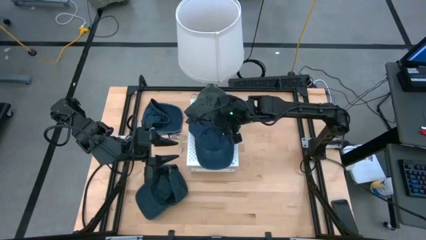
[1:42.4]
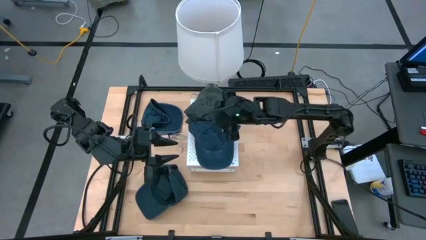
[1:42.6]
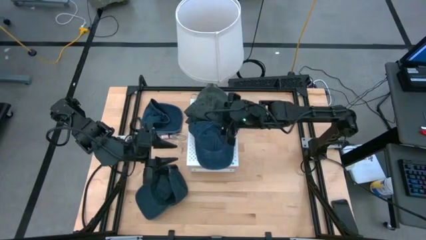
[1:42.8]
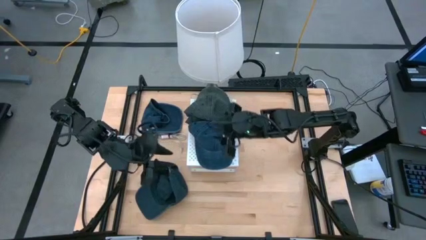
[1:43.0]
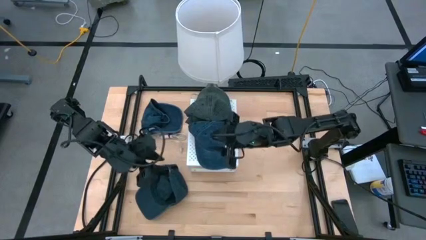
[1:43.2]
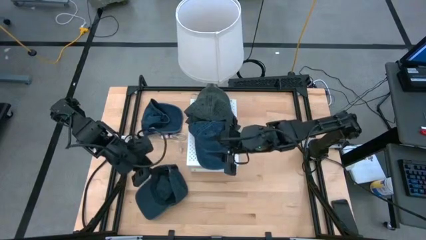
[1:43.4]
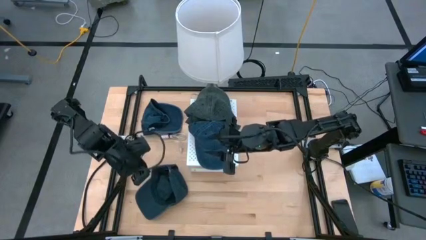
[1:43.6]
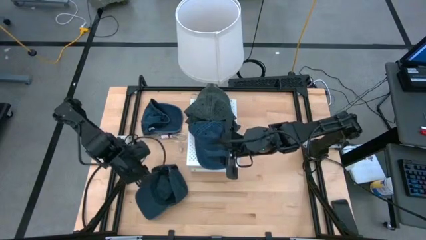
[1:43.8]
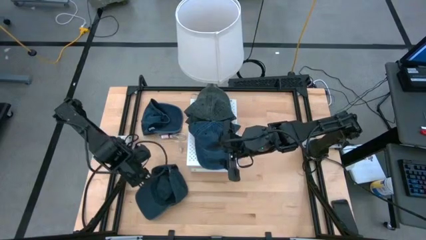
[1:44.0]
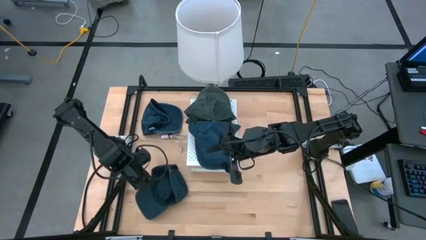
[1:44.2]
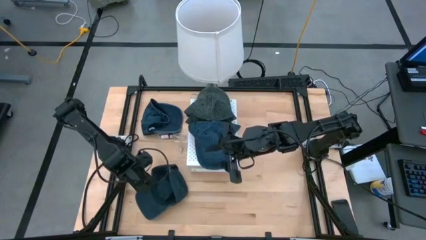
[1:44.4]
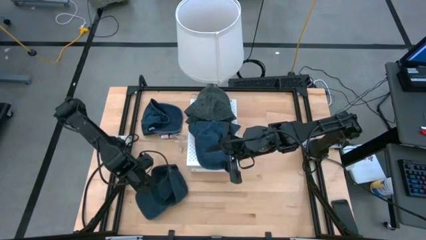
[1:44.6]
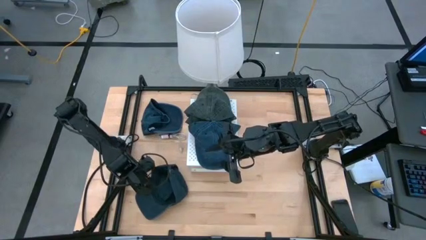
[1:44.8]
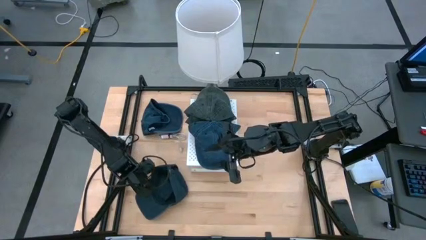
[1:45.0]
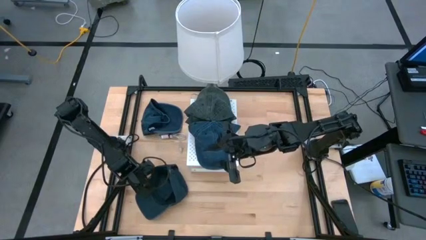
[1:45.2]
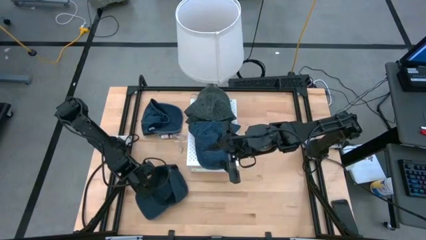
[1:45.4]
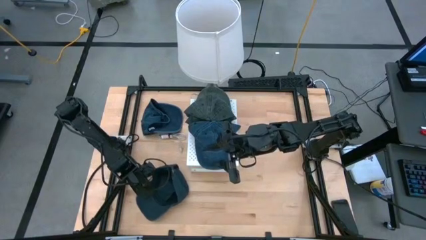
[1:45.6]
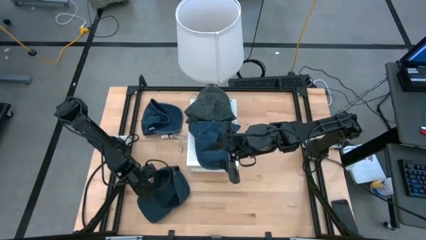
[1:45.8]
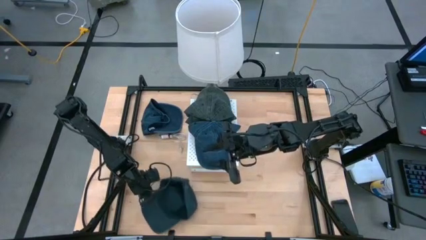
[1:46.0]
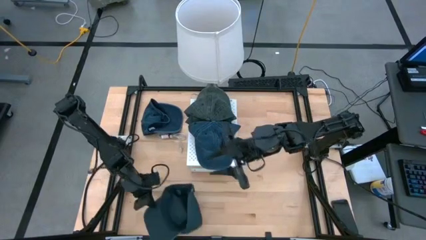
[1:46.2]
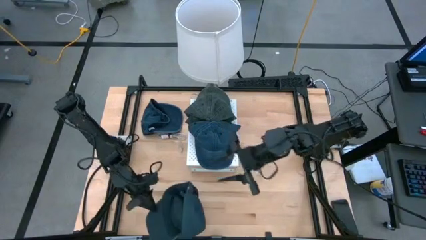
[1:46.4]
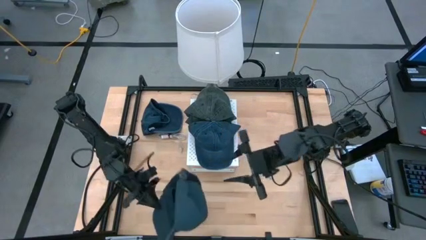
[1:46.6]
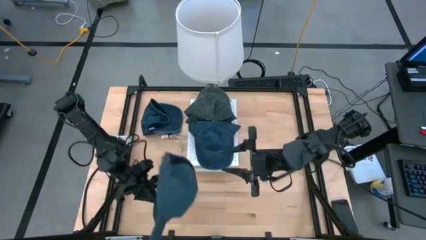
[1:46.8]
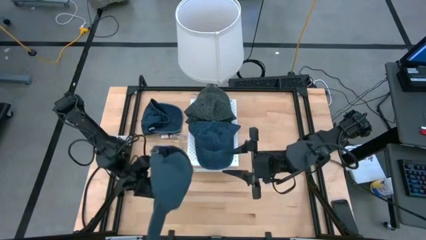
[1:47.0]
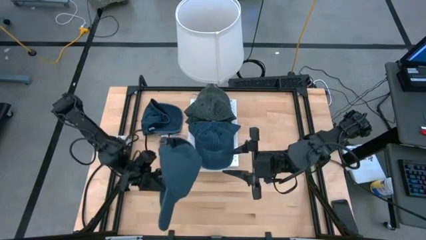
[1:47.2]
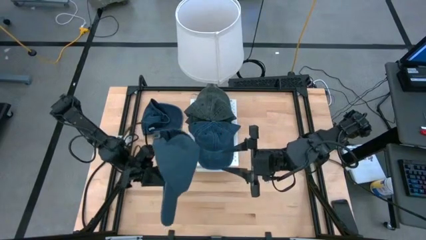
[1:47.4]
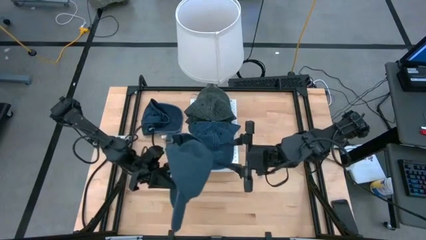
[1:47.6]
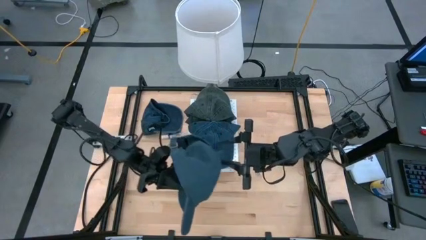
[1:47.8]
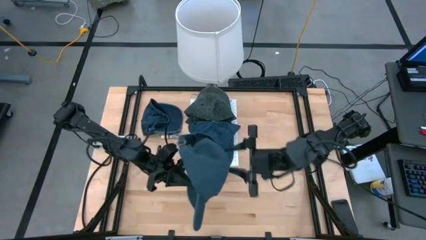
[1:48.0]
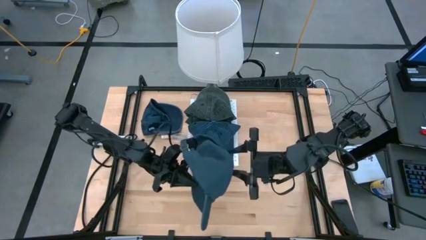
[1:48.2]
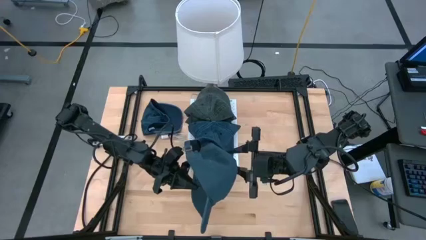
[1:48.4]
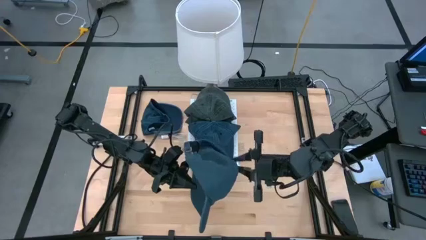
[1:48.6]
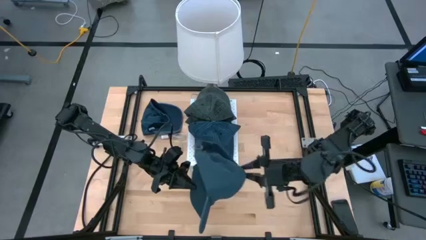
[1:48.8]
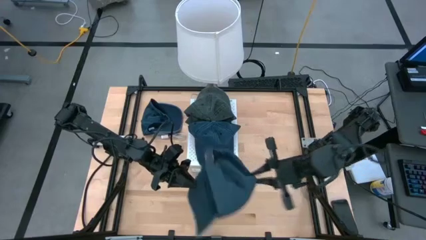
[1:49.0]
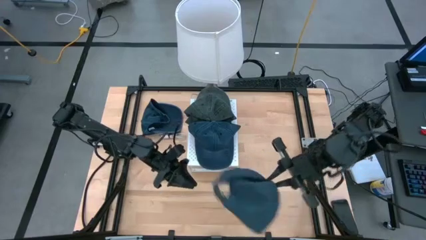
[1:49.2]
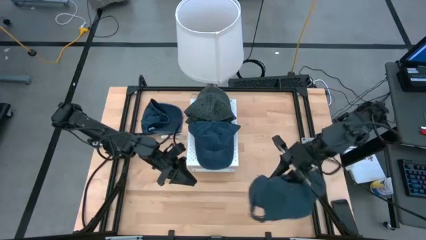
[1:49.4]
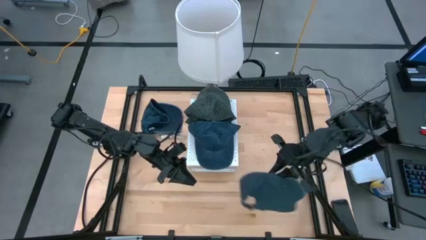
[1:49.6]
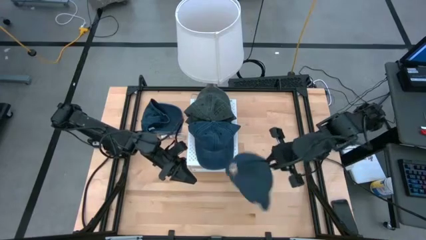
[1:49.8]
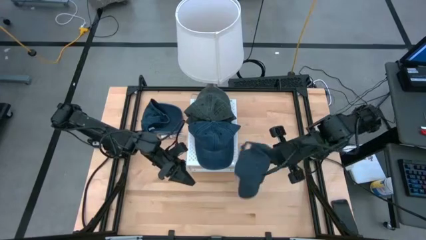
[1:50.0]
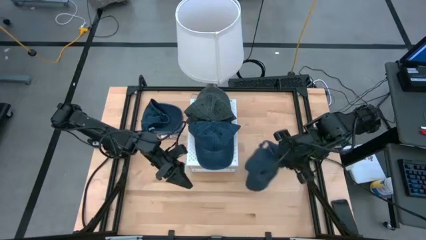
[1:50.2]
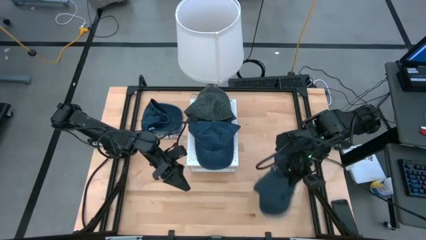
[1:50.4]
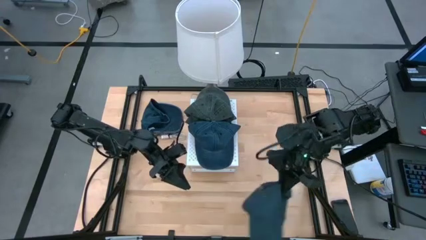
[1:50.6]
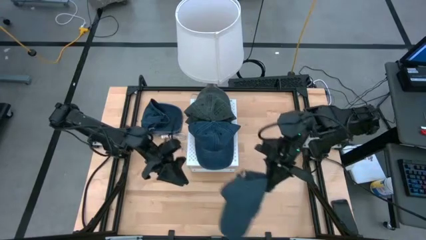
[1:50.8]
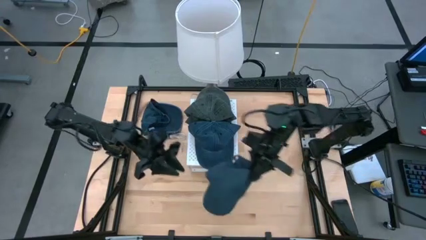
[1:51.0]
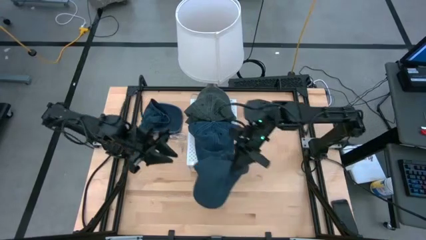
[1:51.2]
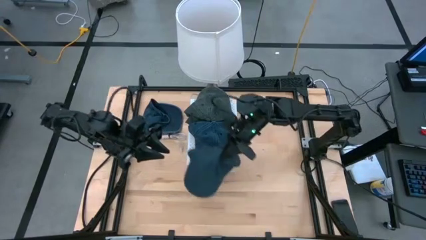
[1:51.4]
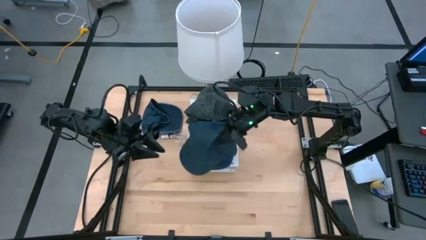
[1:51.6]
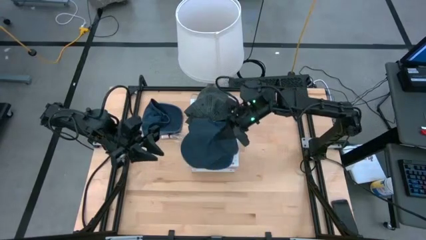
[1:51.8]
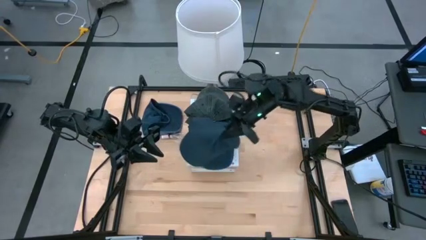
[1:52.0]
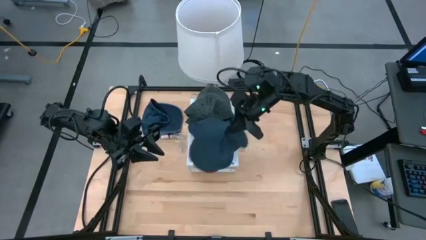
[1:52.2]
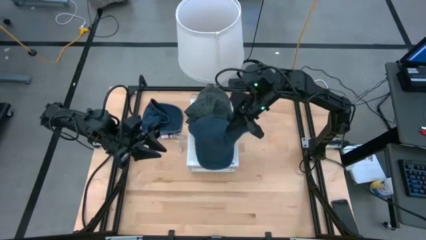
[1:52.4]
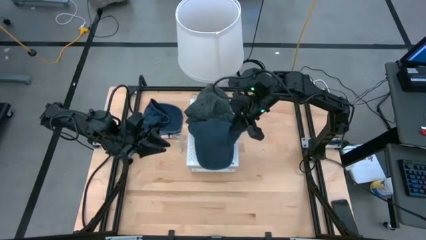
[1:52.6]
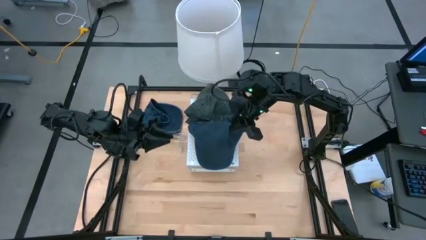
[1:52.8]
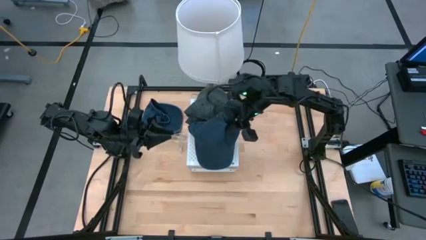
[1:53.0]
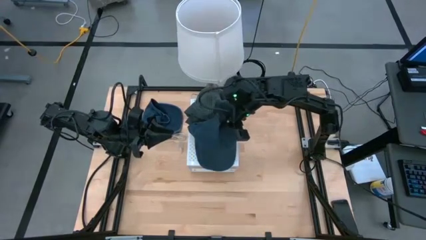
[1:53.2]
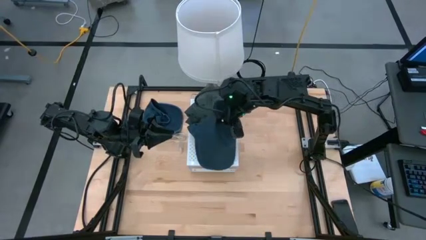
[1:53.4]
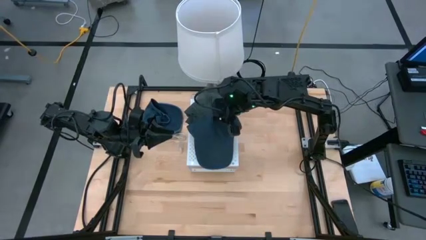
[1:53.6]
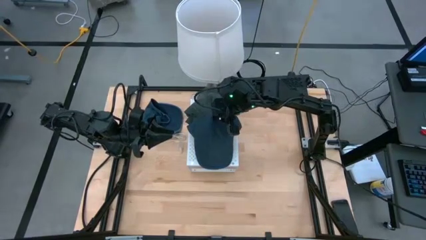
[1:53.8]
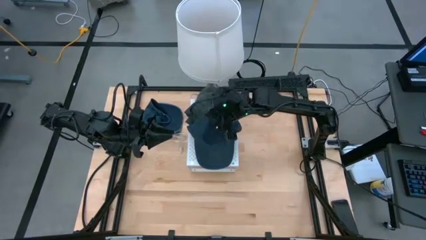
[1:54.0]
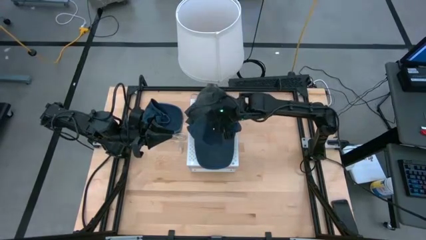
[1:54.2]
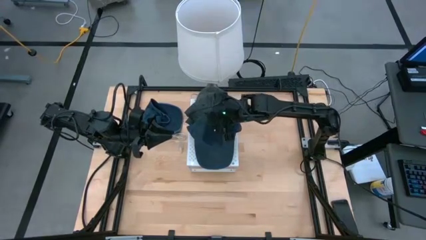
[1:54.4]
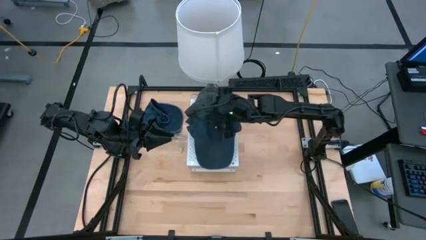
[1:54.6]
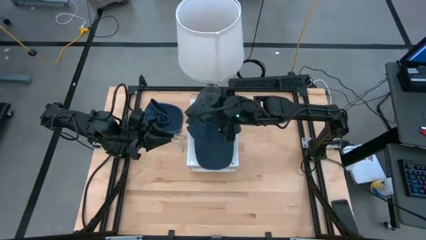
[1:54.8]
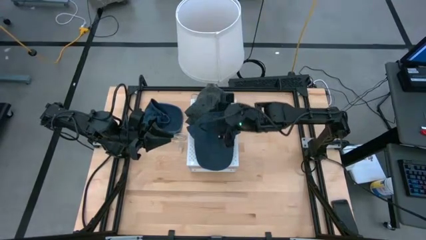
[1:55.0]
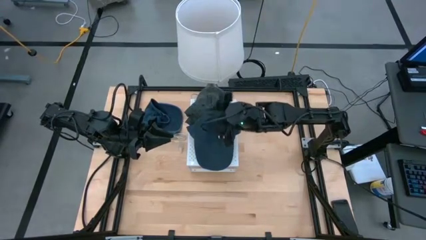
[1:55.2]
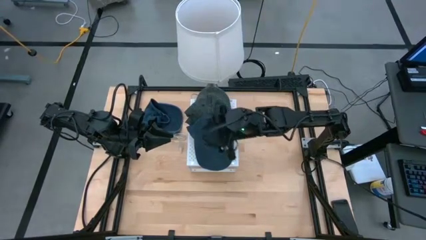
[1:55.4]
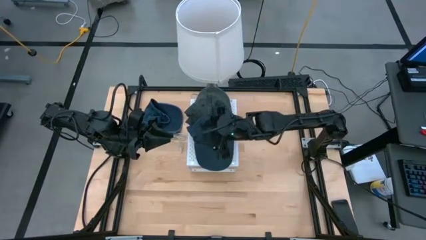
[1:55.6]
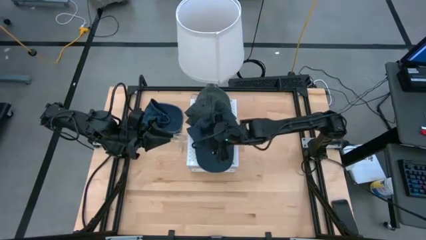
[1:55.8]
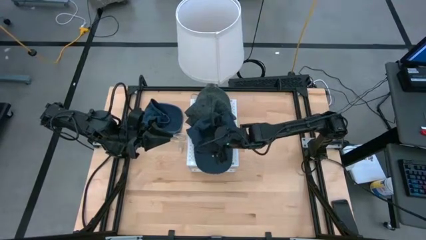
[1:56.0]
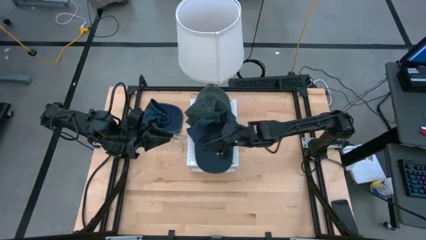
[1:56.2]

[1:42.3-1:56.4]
Task: Pick & Place hat
Stack the bottom blue cap on the blue cap on the shelf

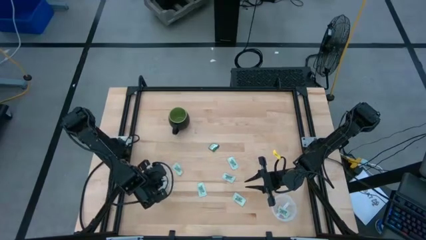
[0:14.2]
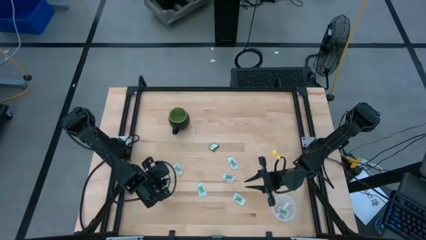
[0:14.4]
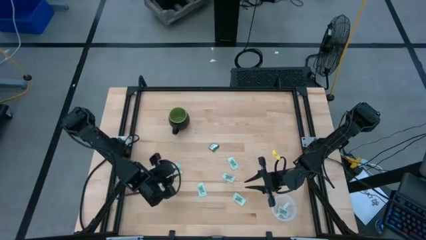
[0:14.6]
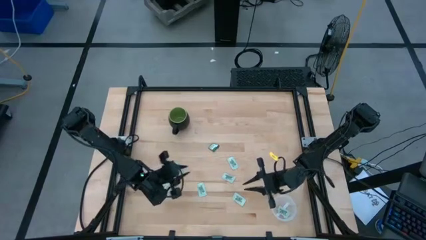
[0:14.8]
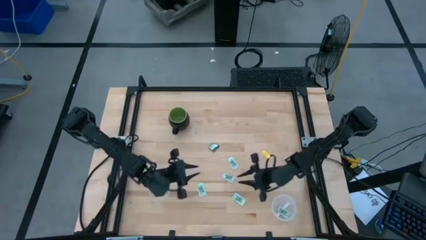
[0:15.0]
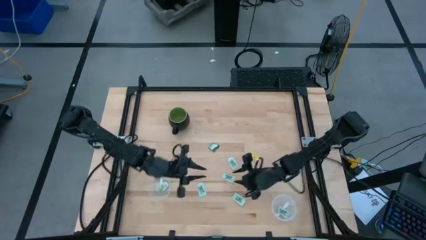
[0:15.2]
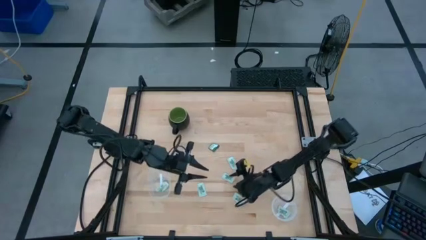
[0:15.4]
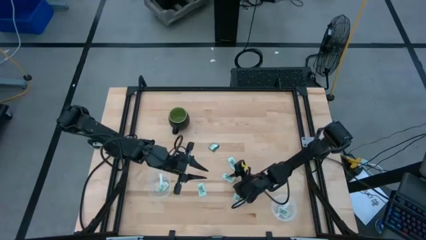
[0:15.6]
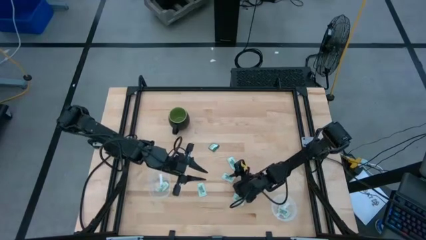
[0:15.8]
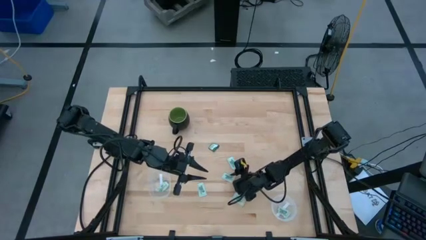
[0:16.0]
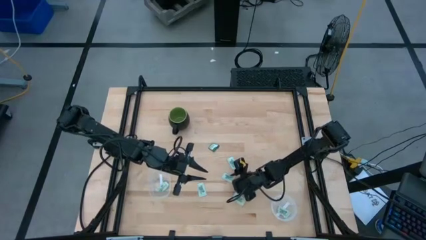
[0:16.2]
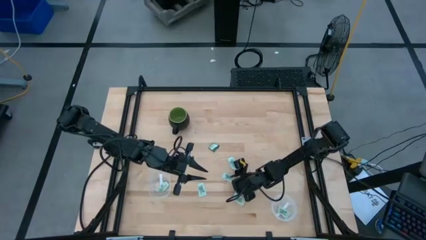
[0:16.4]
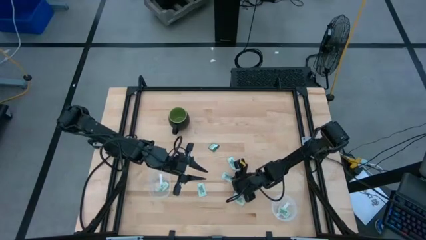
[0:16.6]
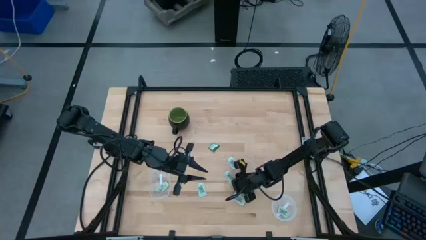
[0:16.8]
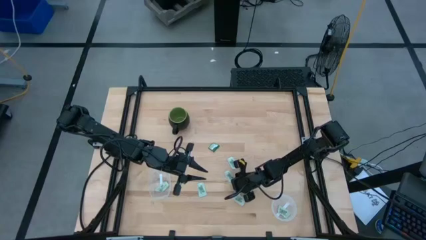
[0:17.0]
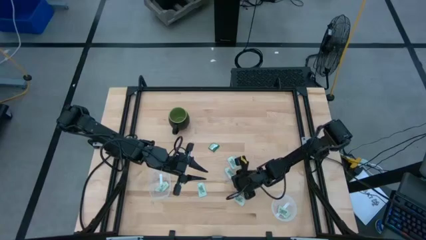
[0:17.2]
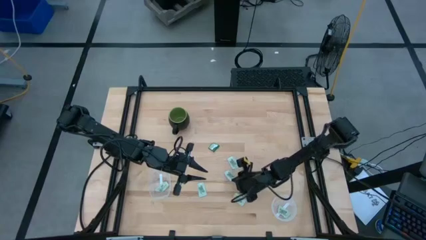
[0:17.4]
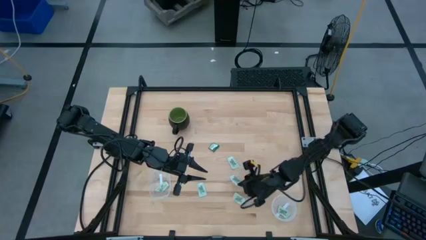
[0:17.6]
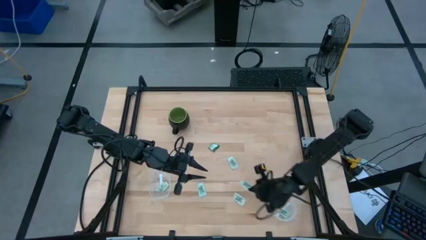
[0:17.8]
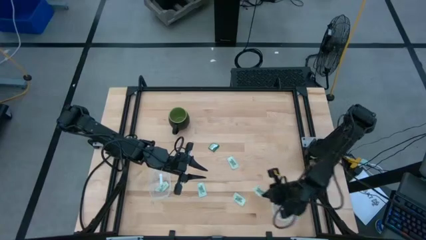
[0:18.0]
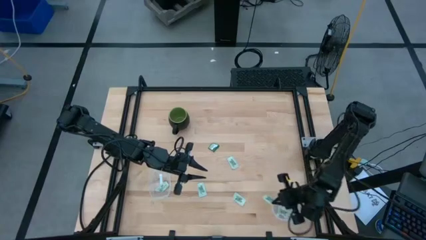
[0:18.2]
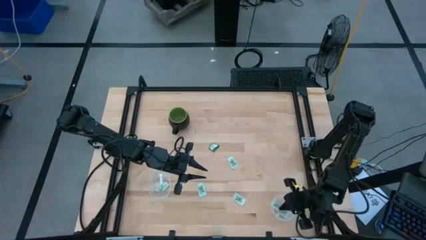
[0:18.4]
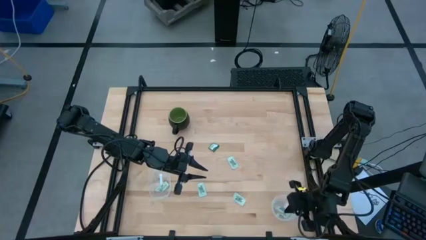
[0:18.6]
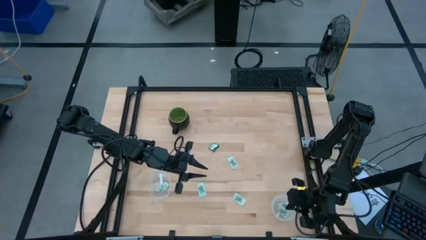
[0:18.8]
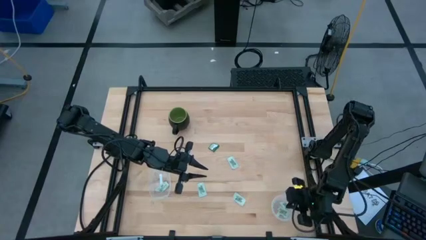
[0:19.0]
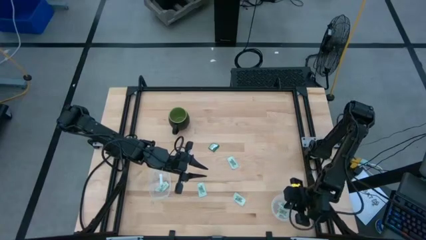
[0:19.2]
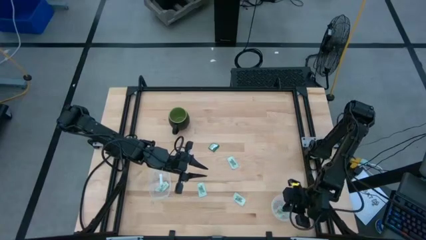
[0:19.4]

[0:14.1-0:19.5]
Task: Pick and place Stevia / Truvia into bins
Put the Stevia packet into the bottom right transparent container
